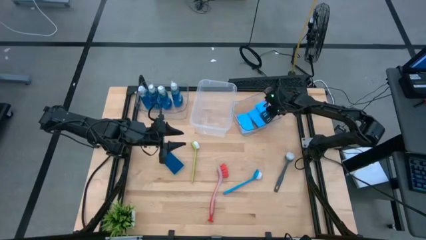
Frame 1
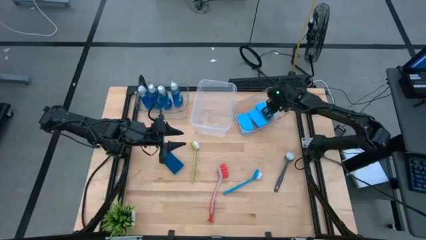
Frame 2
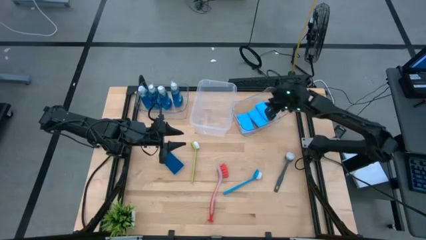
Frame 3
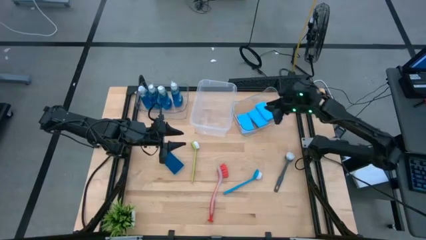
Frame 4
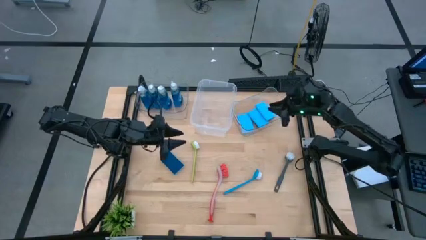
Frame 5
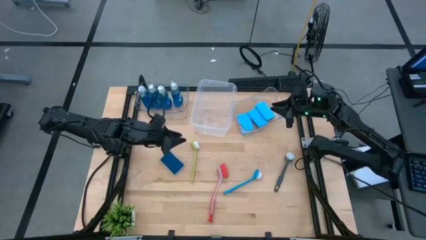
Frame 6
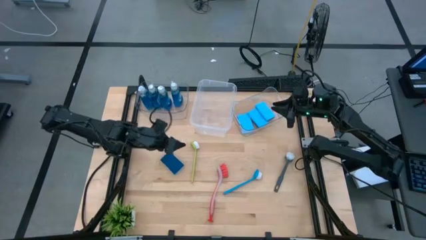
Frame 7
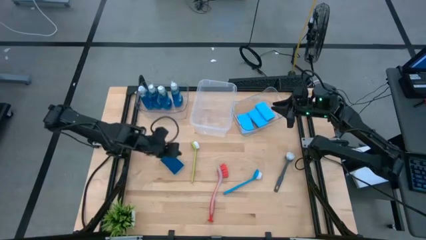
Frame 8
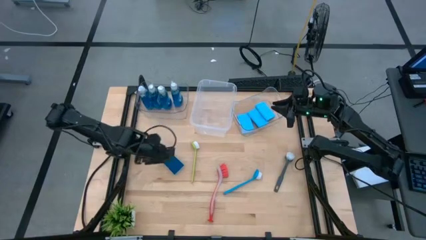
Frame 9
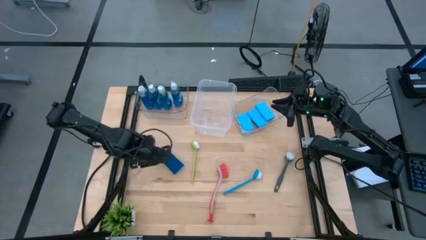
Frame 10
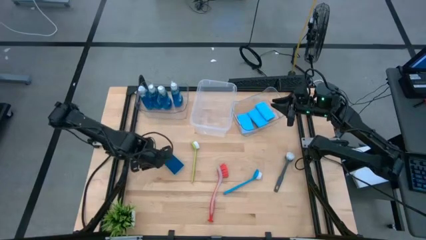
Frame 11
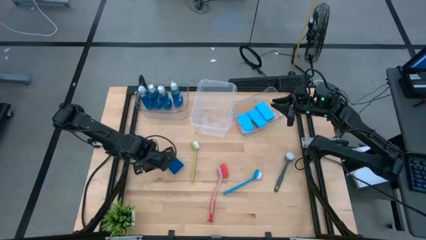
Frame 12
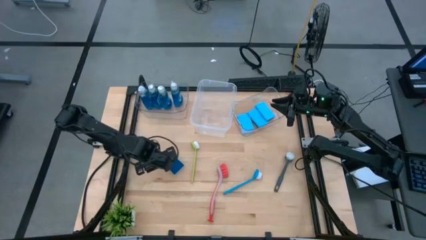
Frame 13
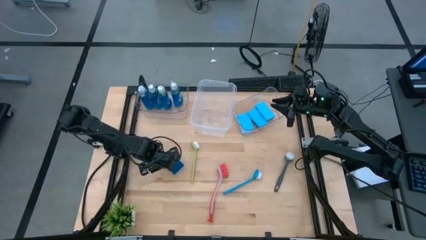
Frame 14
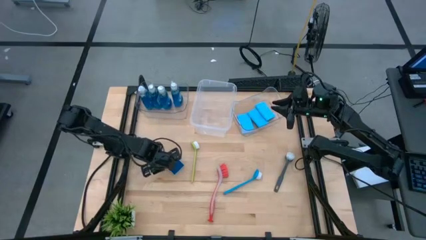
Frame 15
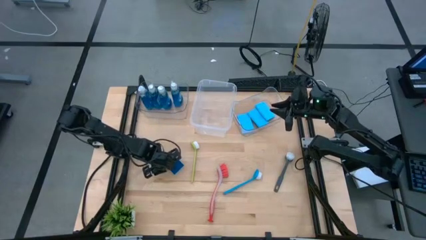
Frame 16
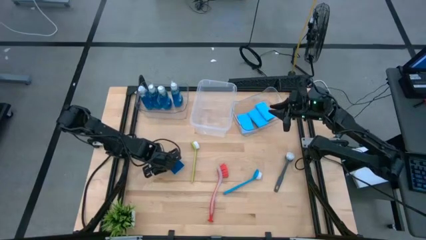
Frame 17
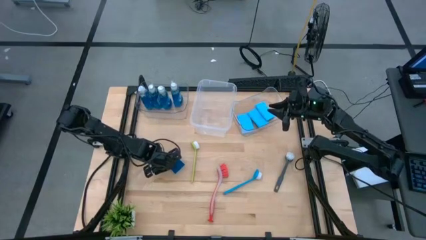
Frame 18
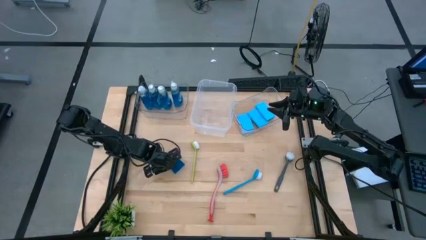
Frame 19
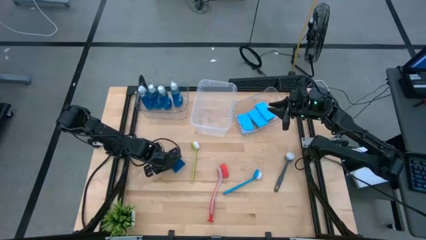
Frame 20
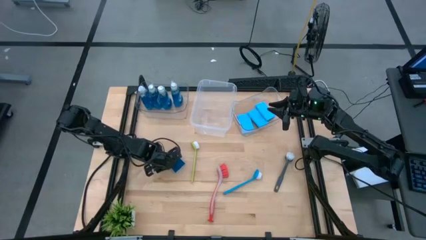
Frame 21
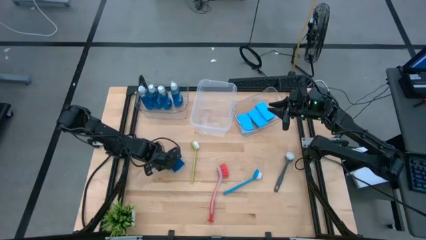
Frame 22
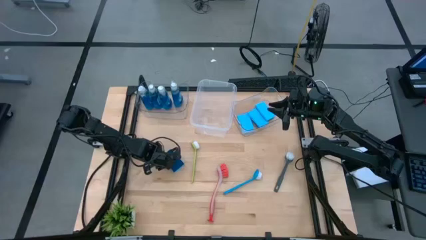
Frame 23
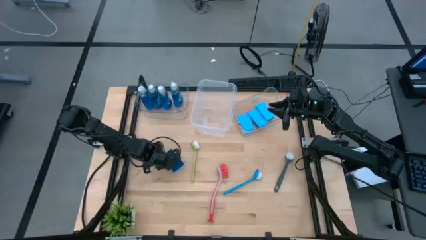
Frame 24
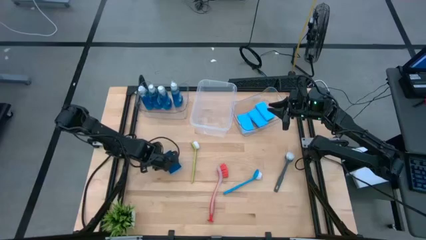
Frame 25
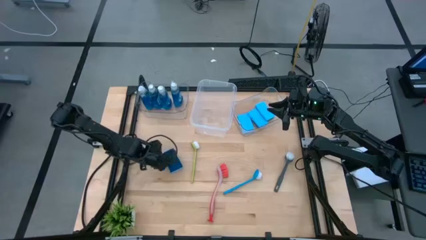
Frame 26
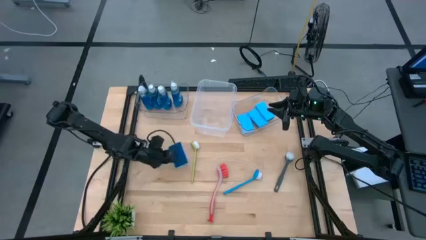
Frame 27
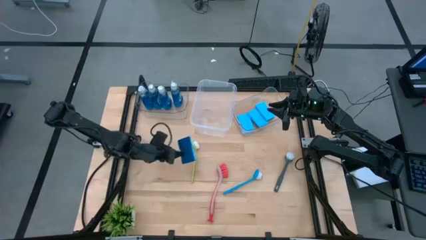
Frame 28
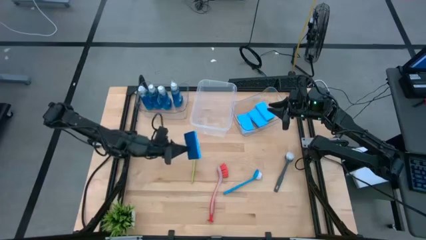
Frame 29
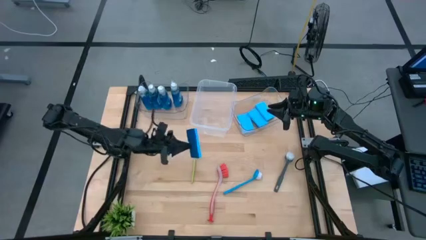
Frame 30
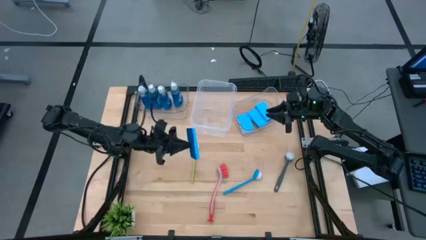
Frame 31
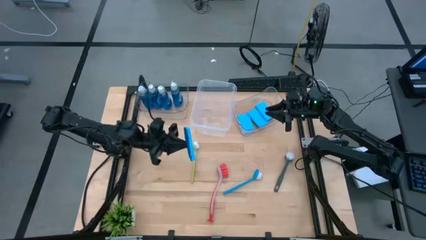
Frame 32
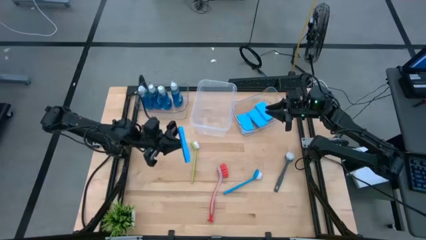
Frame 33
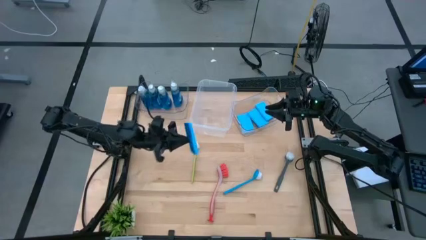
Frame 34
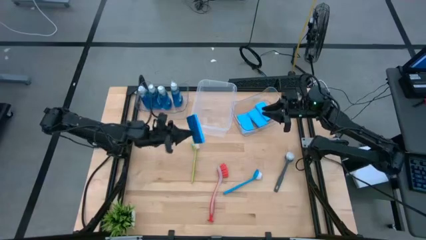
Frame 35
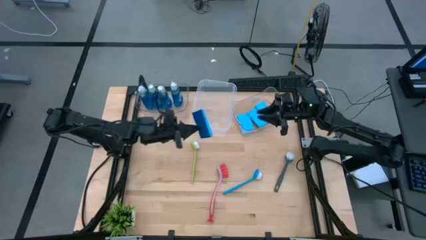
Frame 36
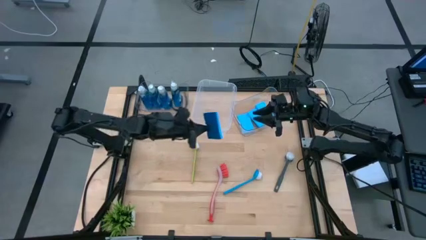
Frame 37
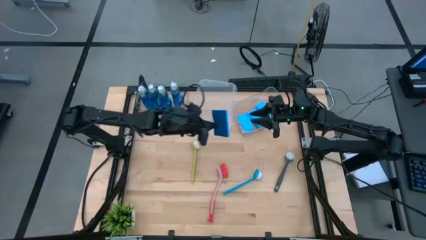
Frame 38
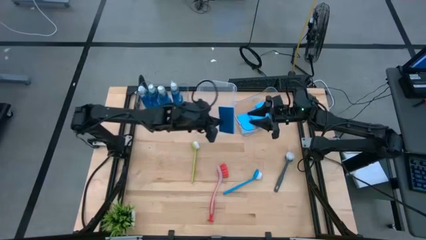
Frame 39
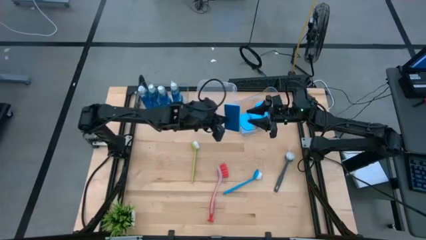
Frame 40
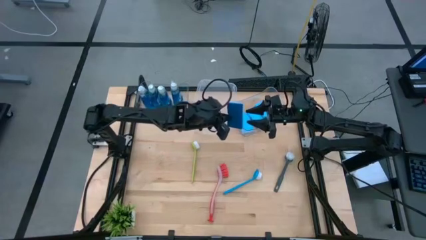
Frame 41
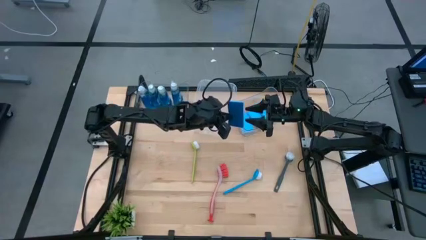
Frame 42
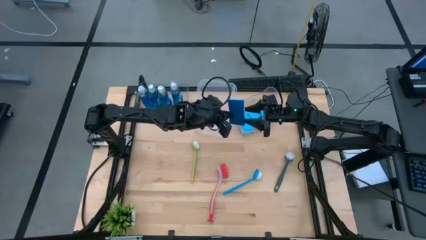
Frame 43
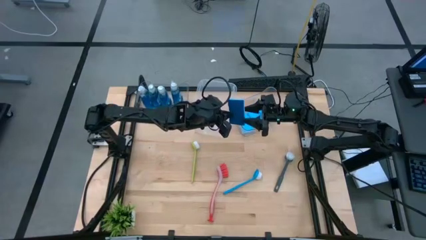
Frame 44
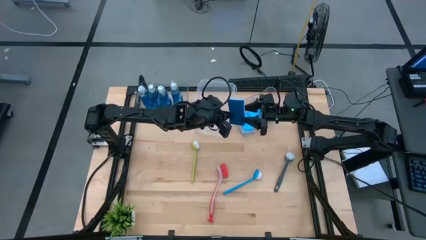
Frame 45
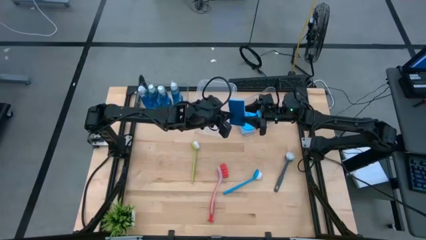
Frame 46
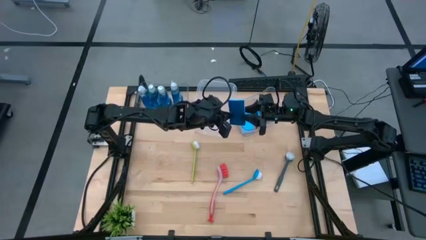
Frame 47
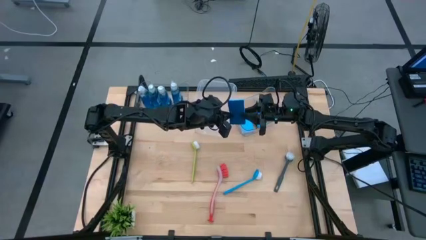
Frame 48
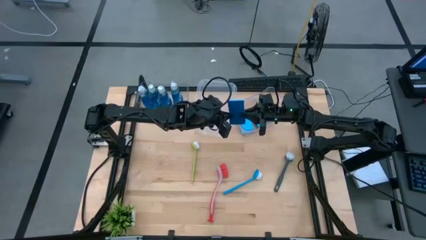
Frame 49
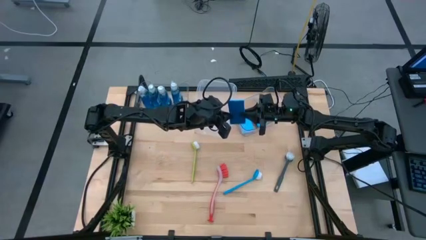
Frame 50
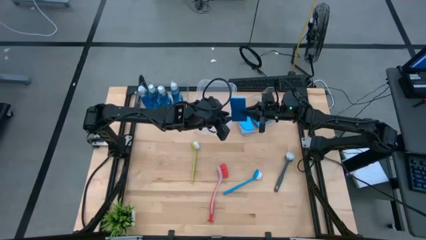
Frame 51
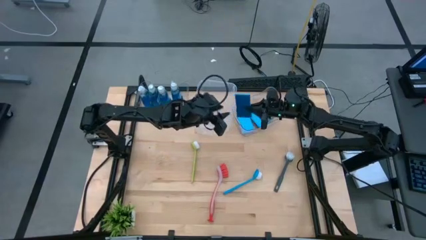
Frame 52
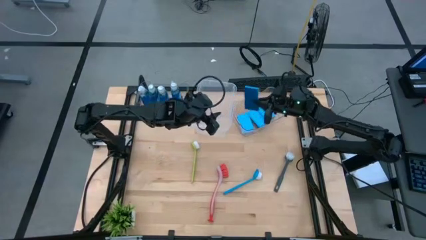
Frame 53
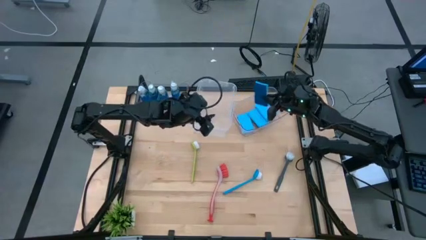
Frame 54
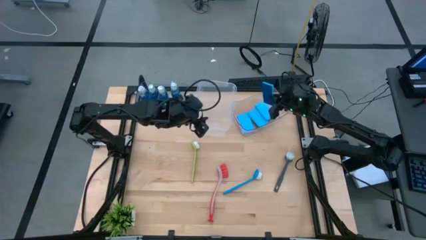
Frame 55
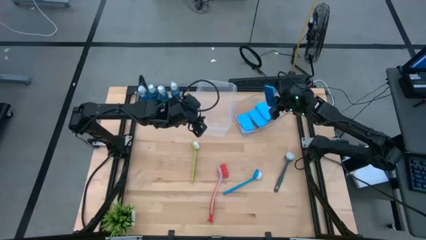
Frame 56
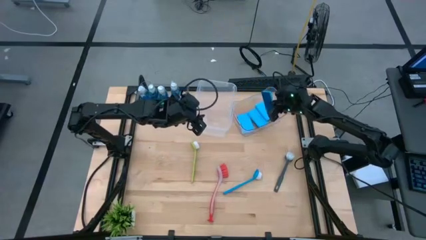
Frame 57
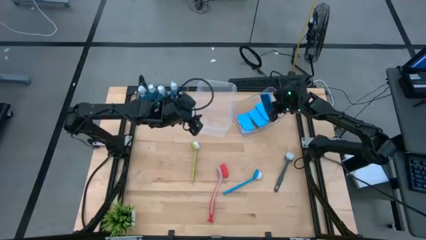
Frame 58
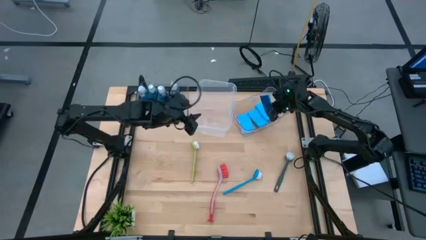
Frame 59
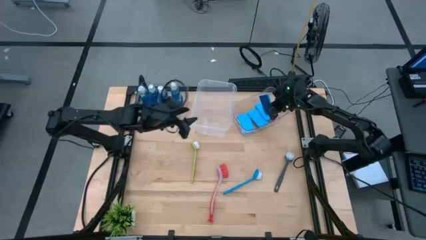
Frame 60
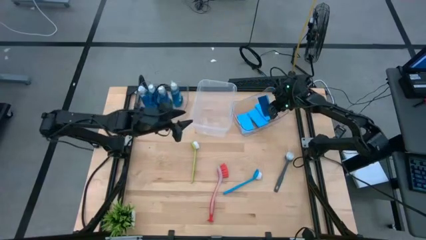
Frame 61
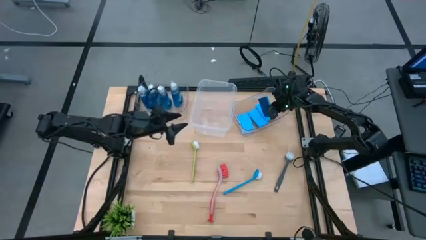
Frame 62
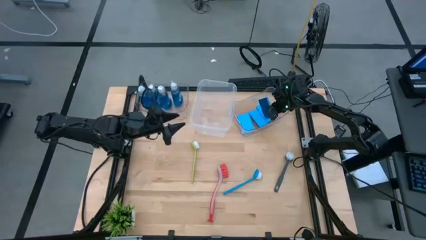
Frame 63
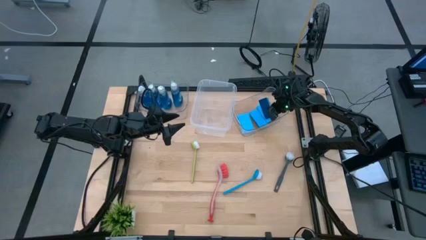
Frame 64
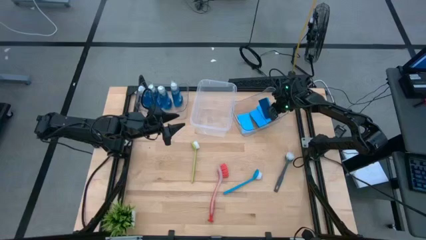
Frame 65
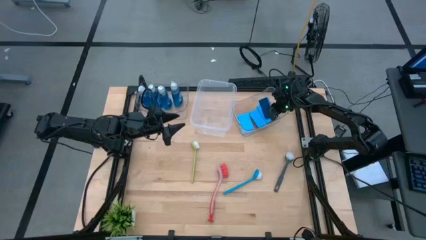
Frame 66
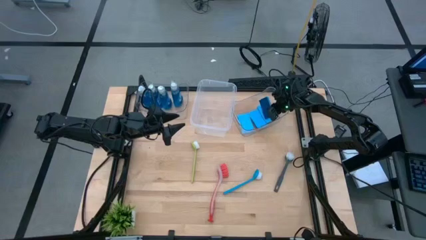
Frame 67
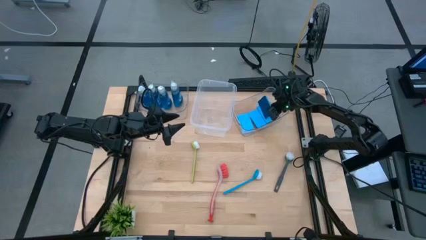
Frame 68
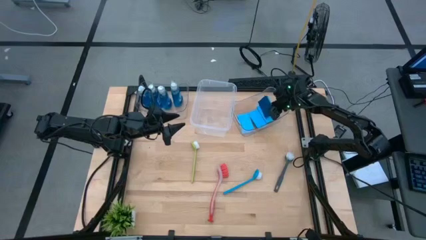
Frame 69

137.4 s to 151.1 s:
Task: Pick & Place Kitchen Sink Supplies
Put the sponge into the right transparent bin

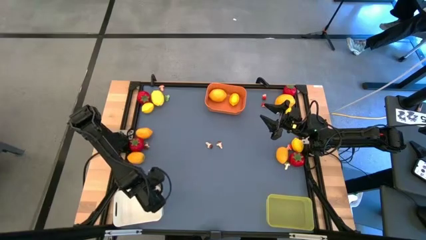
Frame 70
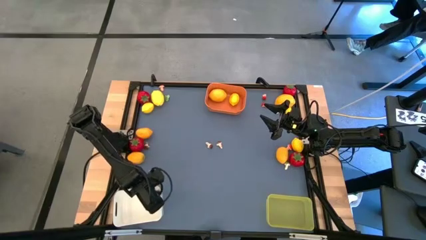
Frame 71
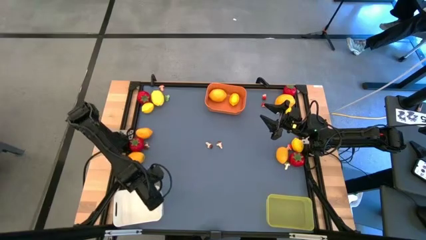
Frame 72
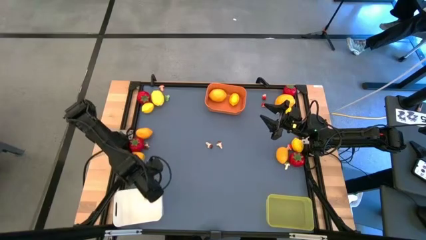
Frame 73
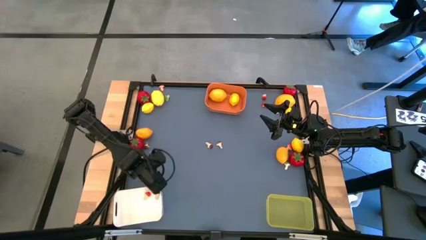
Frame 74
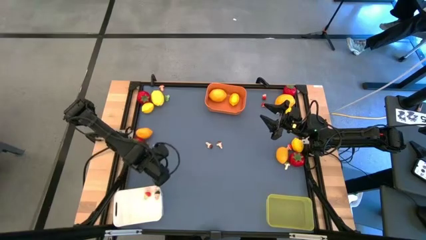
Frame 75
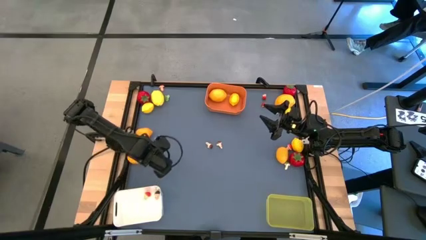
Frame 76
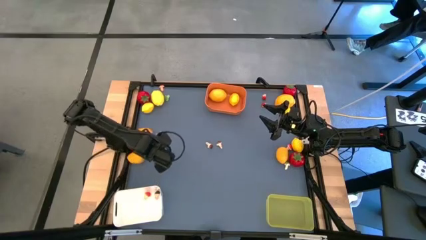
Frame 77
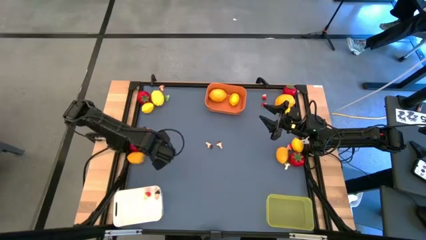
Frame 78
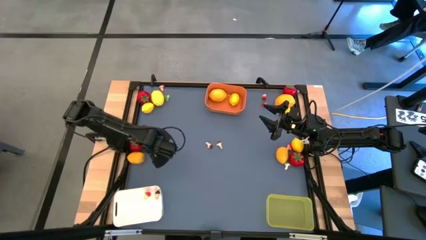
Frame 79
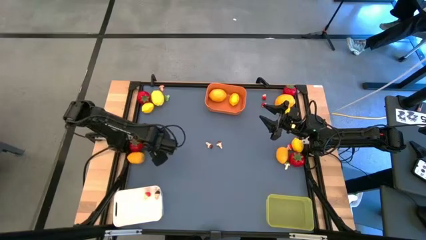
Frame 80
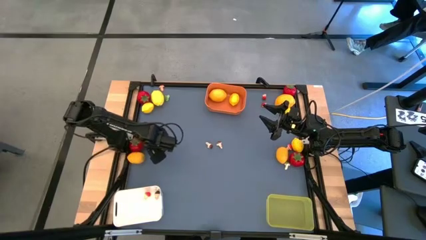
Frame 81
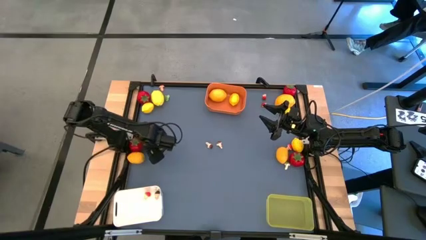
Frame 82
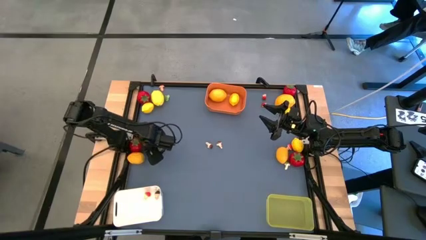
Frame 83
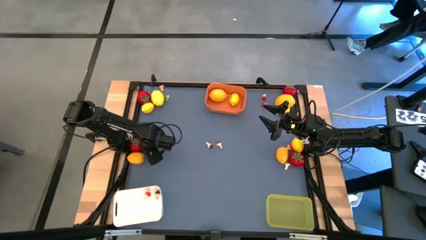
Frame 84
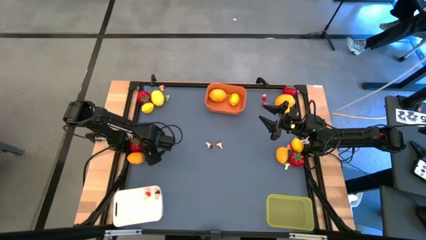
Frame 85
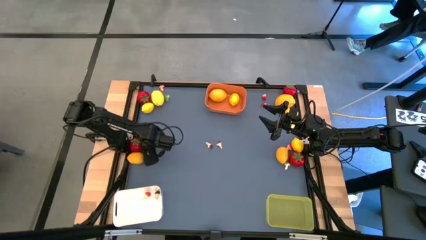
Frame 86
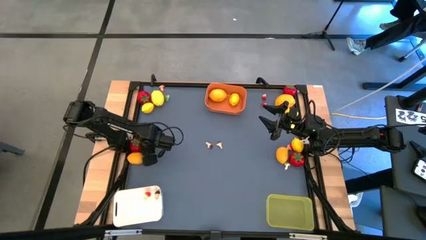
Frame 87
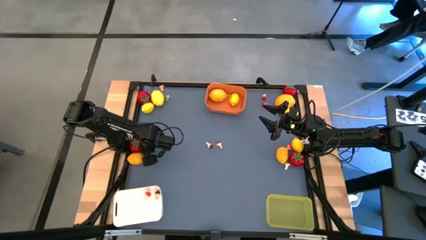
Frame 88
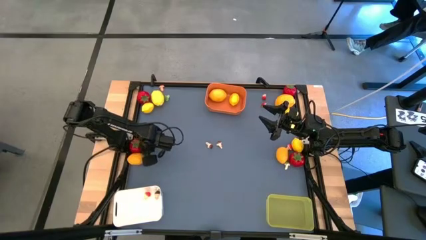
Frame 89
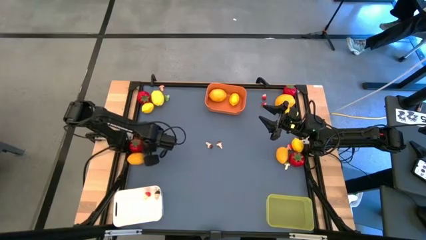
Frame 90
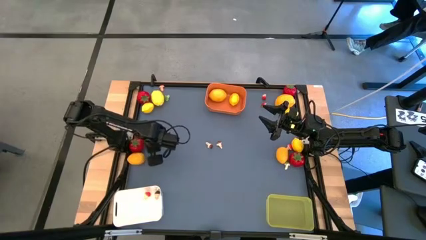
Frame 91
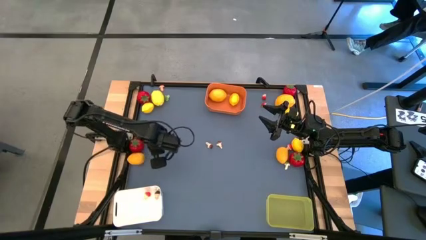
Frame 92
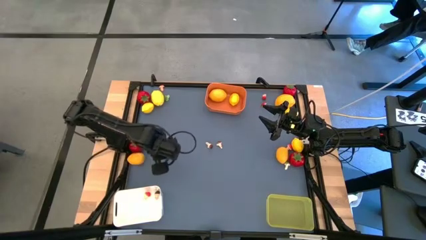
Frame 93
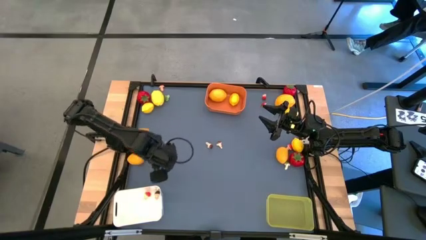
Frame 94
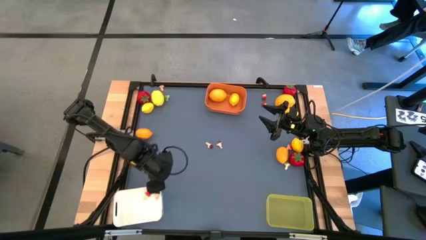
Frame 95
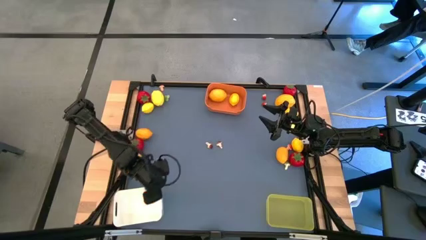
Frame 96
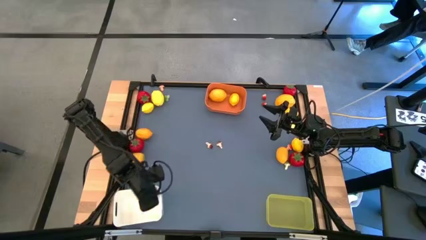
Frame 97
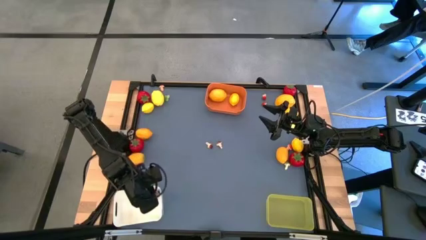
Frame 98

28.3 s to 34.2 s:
Task: Sort produce into baskets
Put the brown mushroom into the white bin
